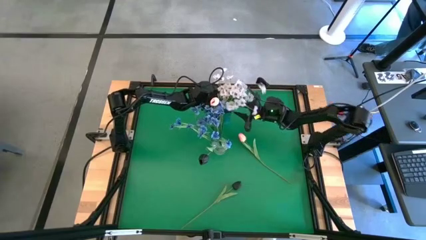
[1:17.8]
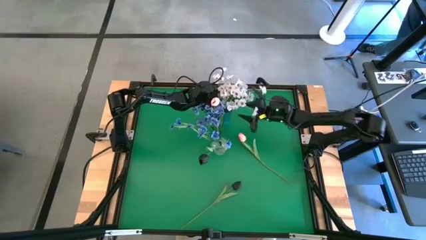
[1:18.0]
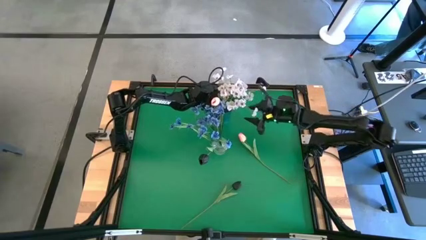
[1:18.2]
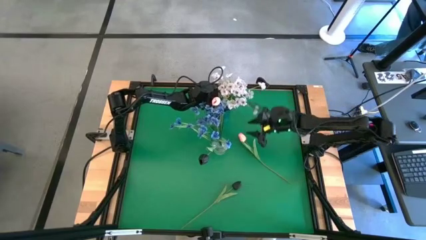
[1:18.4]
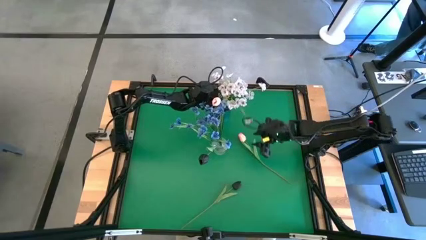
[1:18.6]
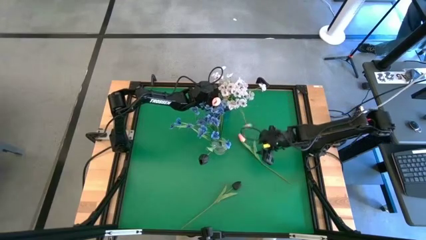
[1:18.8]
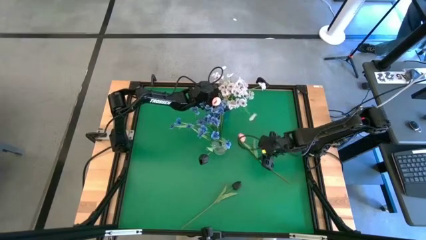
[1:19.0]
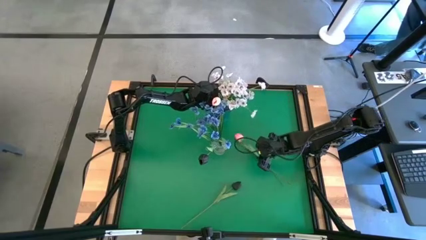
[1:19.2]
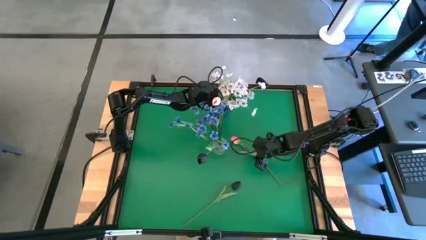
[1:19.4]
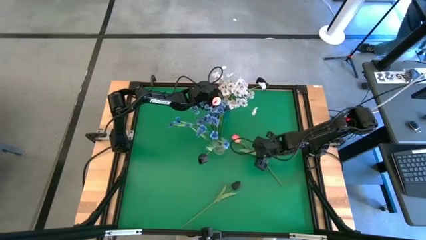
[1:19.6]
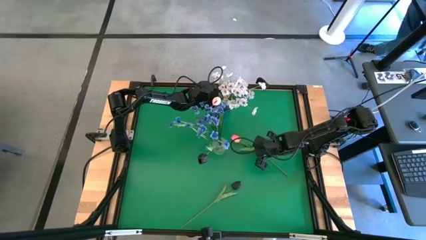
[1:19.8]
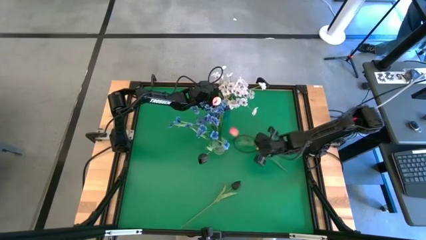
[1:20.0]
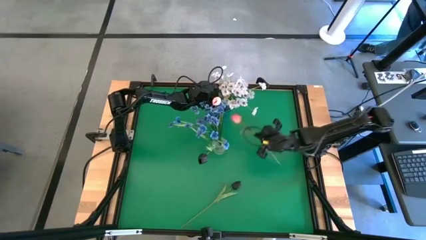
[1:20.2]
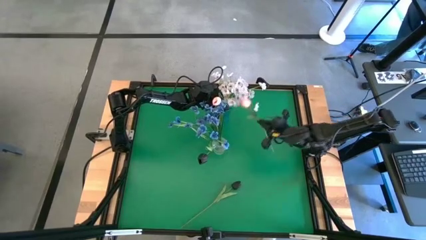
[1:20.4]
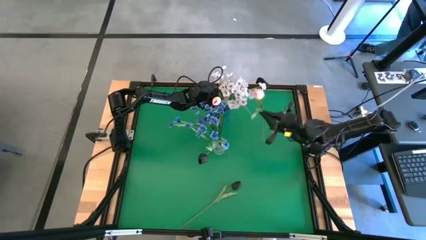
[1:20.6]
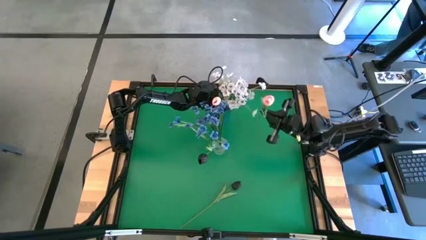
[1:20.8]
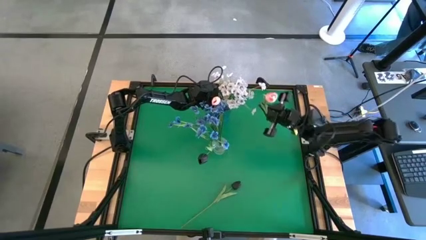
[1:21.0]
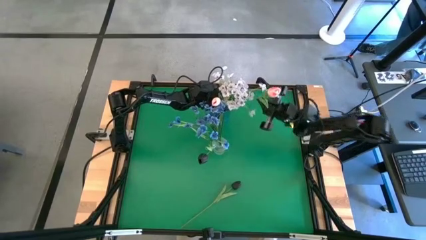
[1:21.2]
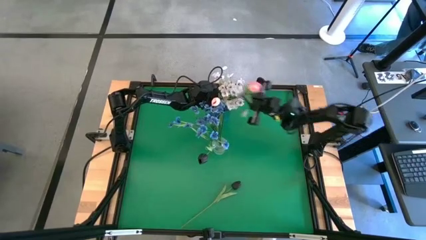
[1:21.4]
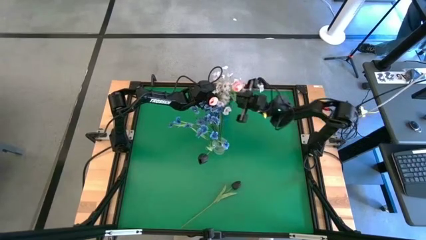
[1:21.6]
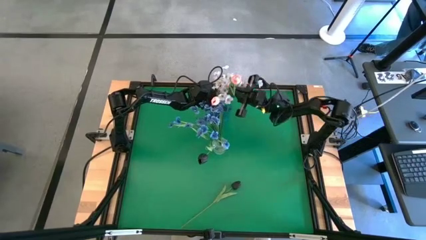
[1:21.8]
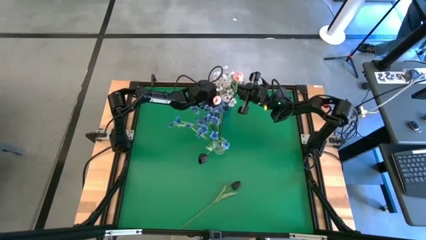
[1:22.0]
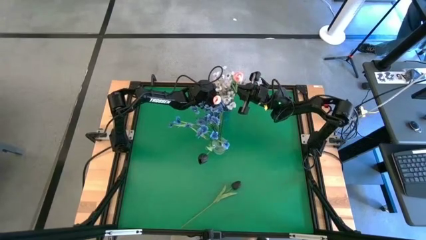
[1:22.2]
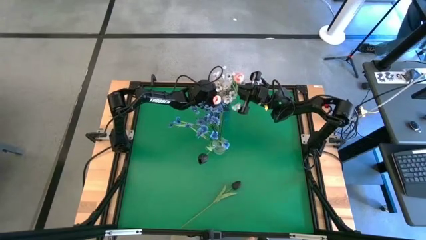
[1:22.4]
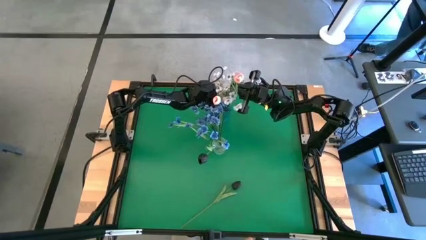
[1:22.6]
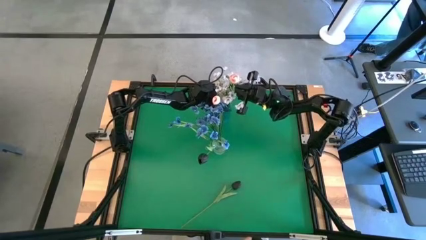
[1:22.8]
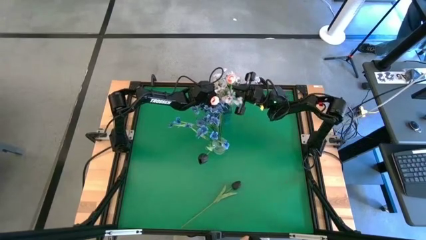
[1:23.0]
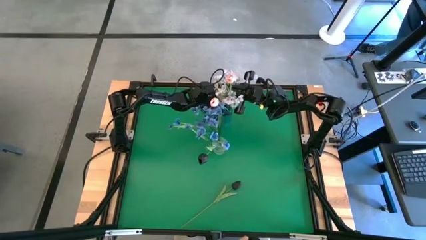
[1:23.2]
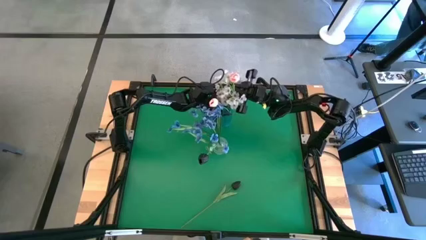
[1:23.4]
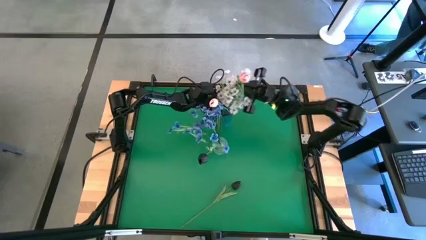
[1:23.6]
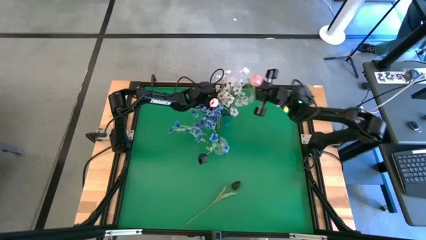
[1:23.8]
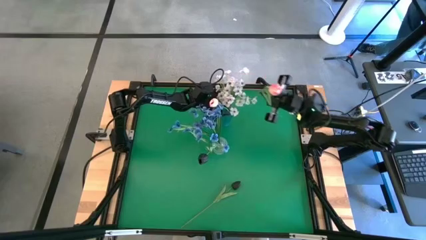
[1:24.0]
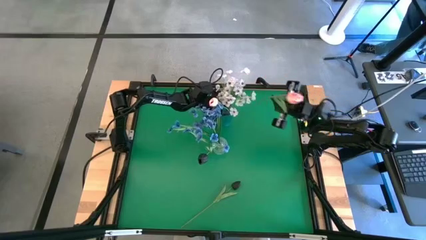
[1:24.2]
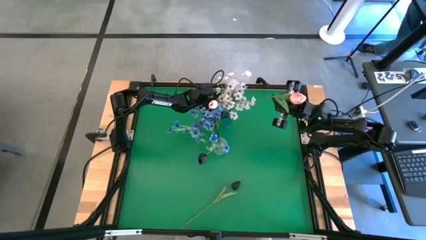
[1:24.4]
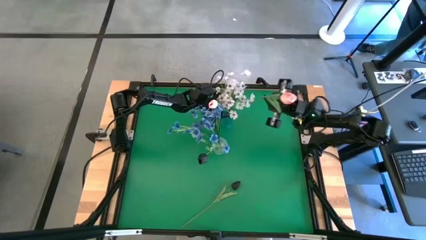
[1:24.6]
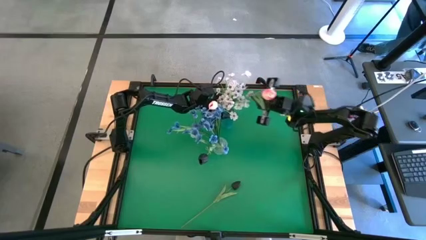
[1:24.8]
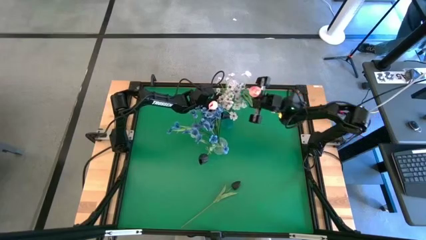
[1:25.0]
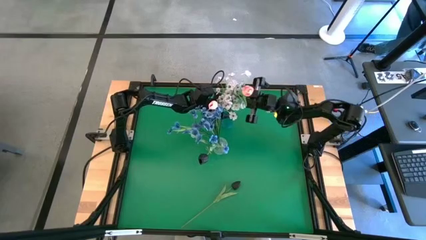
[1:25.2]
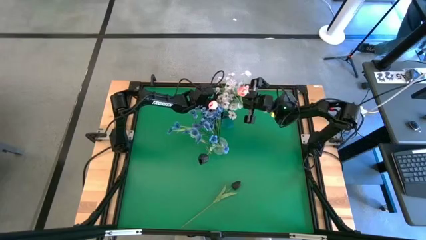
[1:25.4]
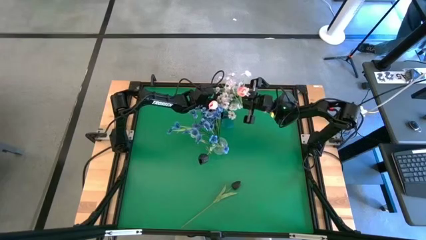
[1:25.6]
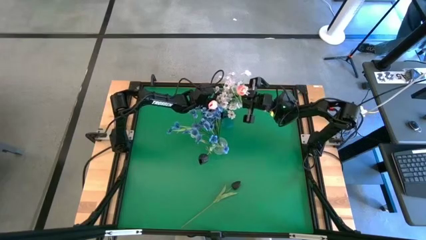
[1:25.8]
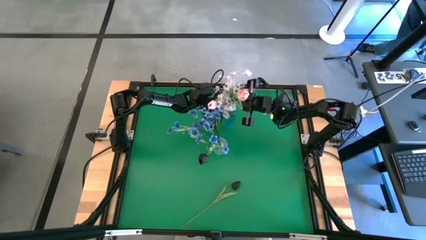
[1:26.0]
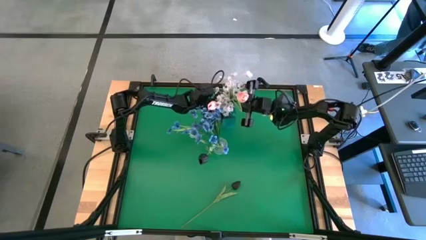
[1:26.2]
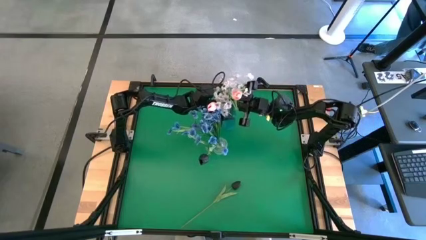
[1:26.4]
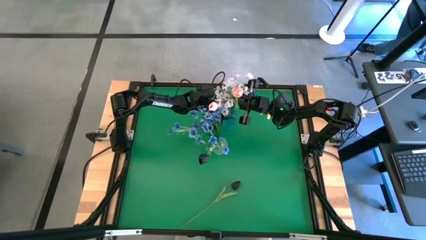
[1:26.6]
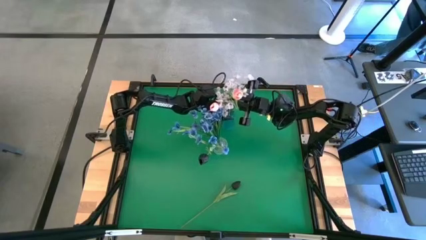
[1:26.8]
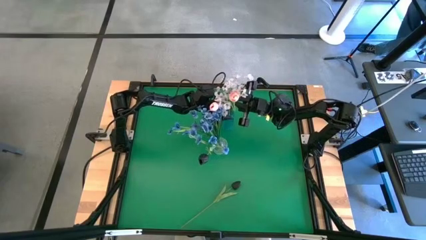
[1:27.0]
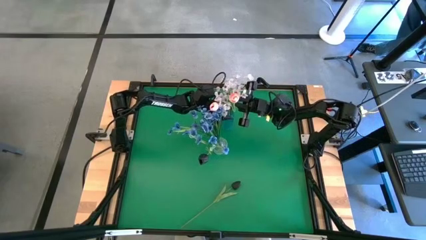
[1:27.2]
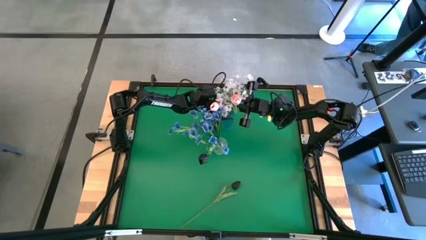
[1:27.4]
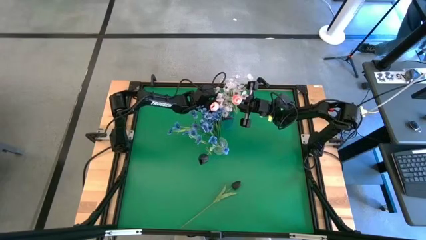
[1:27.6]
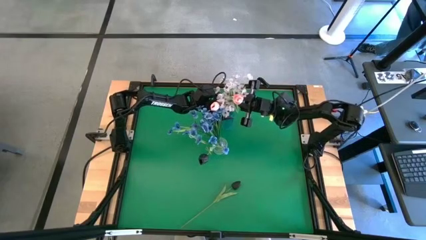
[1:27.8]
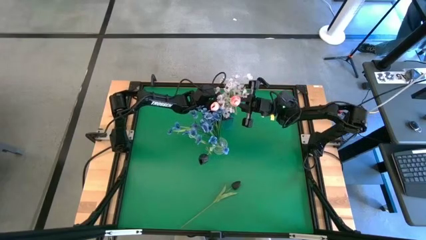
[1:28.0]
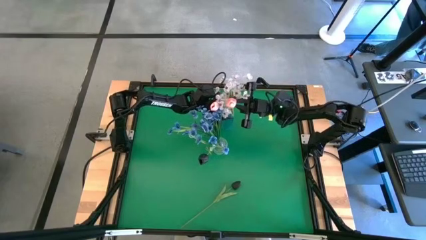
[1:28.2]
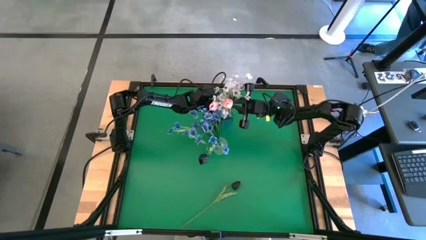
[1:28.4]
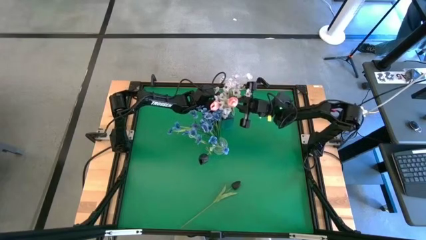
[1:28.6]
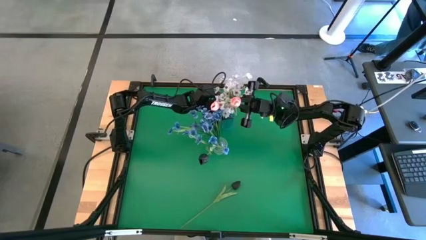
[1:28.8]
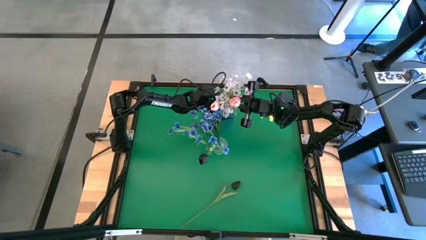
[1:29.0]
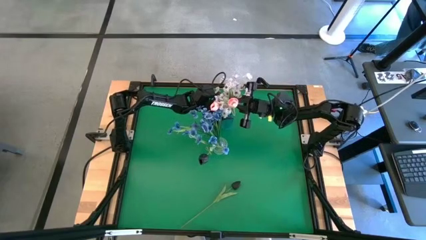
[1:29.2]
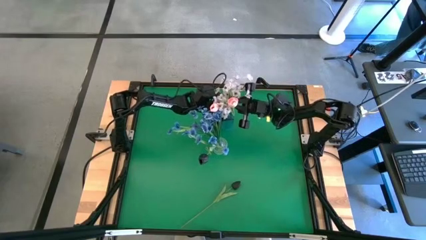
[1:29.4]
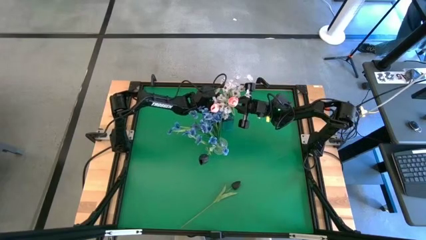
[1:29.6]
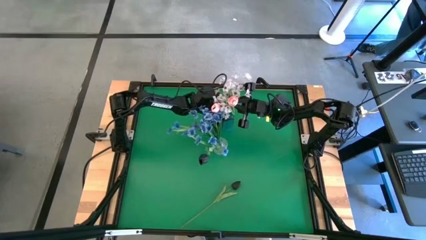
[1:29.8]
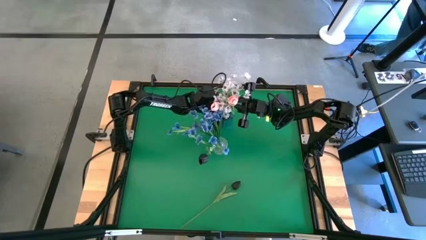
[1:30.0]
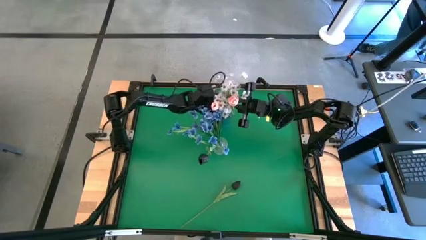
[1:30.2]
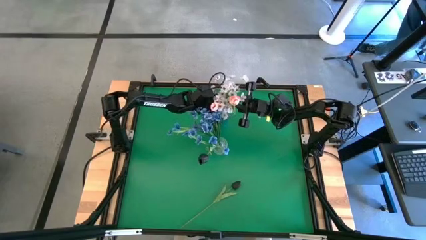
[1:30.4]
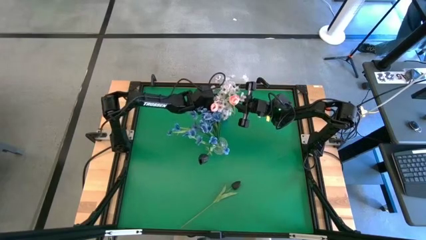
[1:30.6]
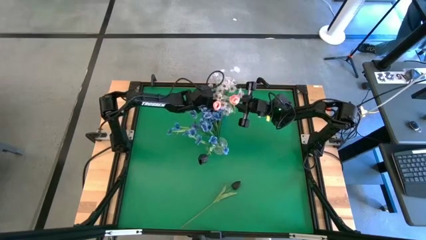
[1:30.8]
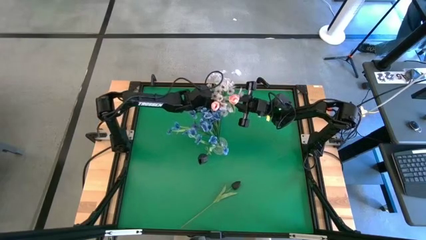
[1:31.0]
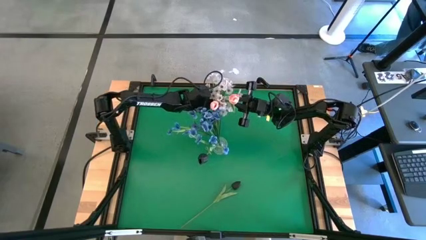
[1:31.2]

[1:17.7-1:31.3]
Task: Sort flowers into vase by color
Put the pink flowers into the blue transparent vase
